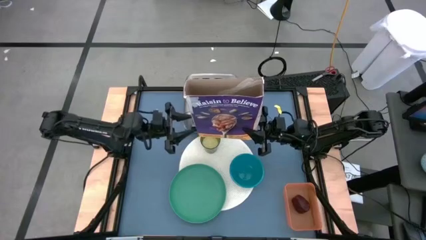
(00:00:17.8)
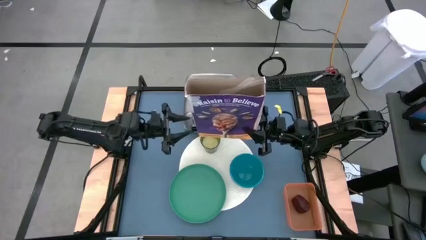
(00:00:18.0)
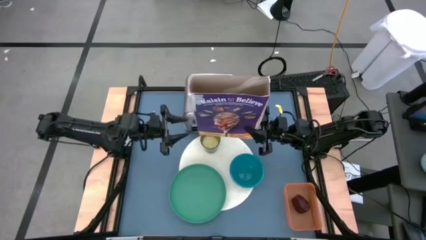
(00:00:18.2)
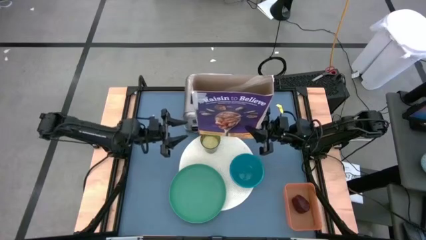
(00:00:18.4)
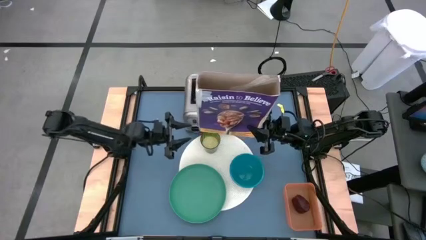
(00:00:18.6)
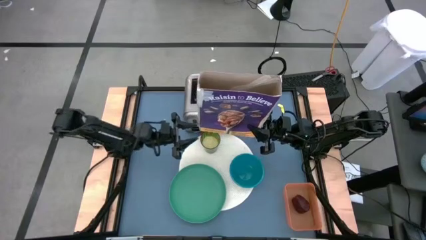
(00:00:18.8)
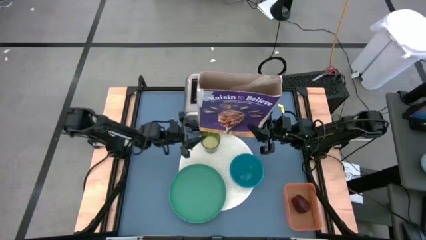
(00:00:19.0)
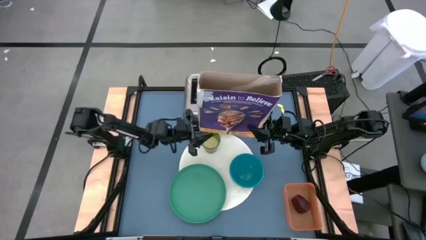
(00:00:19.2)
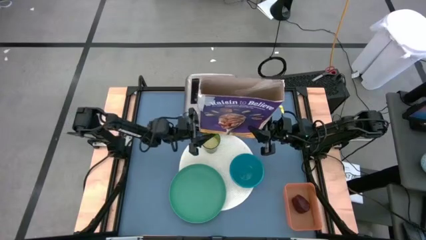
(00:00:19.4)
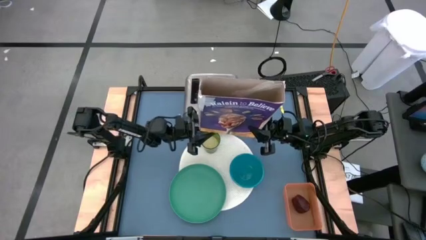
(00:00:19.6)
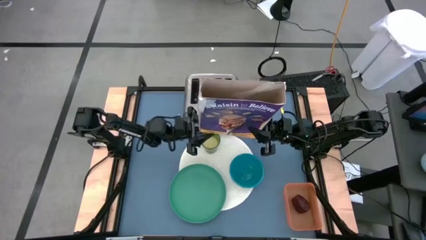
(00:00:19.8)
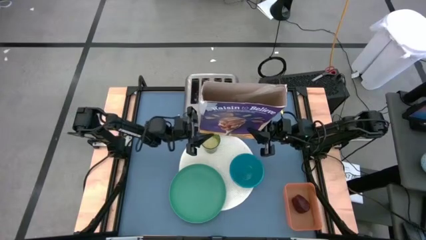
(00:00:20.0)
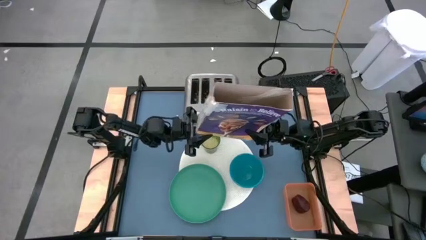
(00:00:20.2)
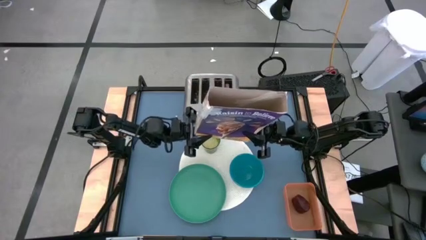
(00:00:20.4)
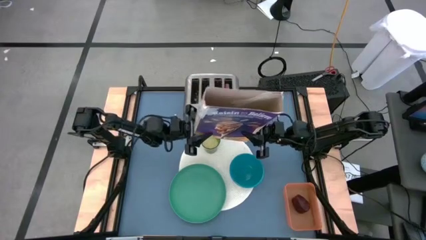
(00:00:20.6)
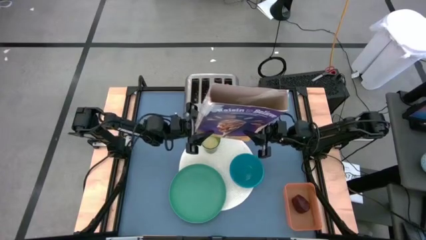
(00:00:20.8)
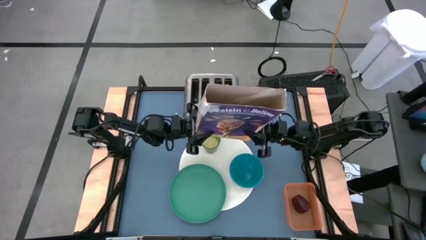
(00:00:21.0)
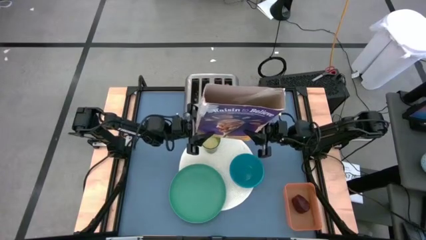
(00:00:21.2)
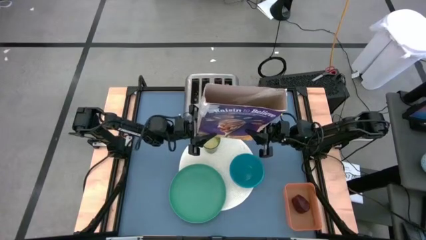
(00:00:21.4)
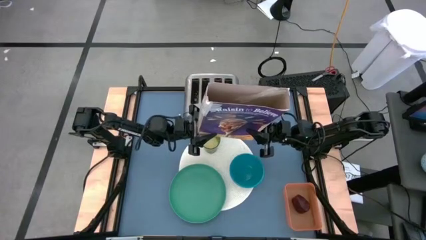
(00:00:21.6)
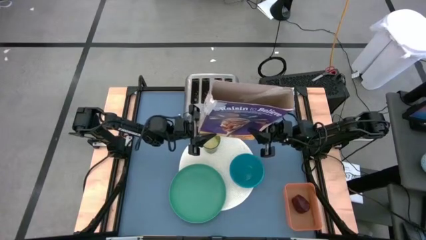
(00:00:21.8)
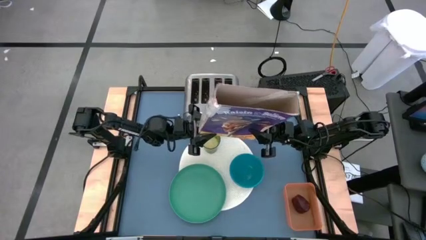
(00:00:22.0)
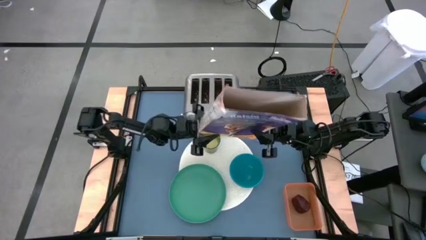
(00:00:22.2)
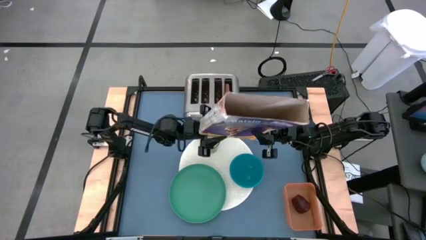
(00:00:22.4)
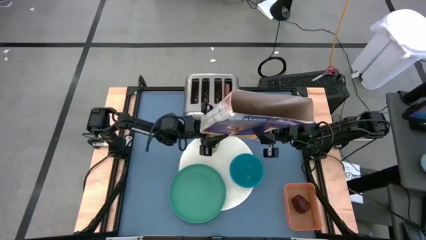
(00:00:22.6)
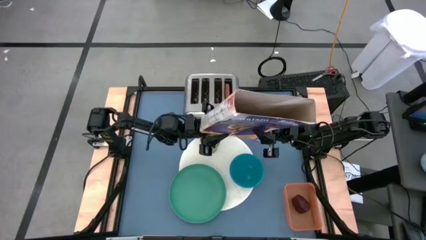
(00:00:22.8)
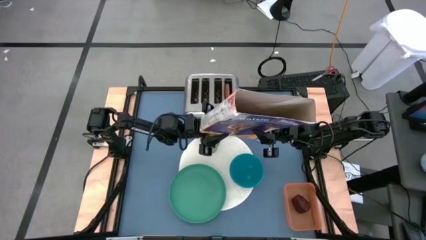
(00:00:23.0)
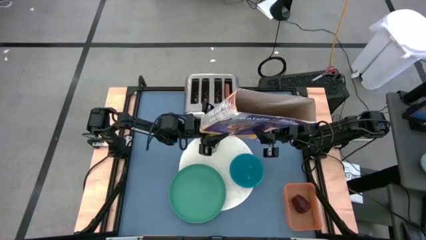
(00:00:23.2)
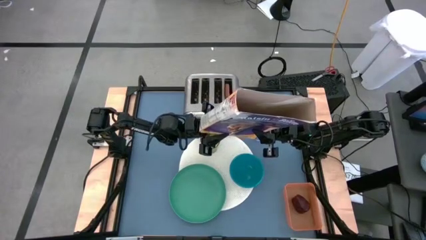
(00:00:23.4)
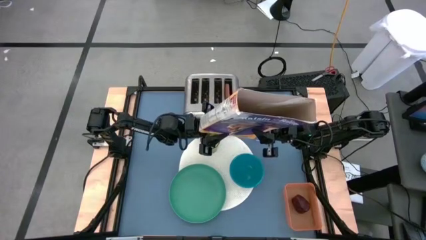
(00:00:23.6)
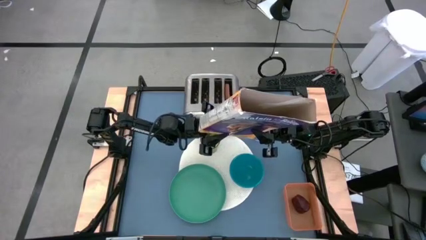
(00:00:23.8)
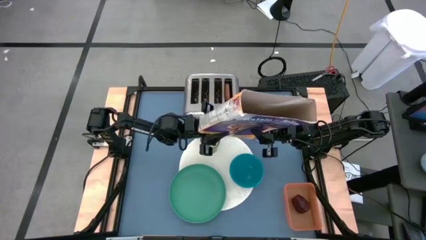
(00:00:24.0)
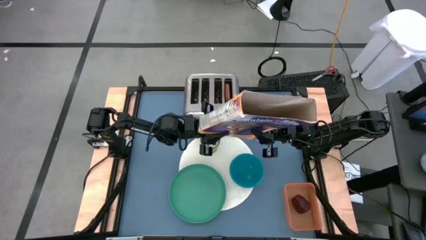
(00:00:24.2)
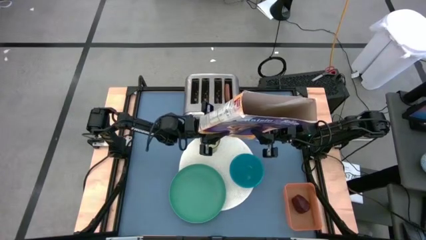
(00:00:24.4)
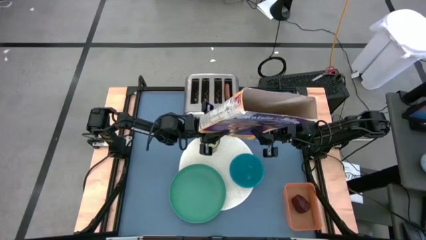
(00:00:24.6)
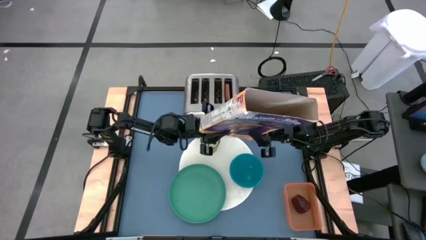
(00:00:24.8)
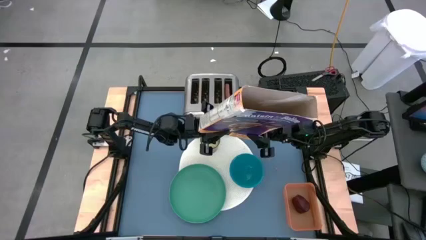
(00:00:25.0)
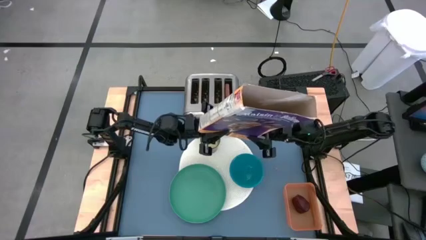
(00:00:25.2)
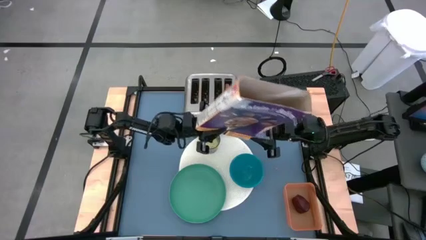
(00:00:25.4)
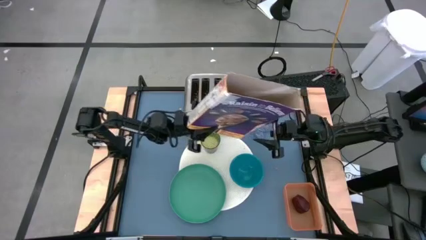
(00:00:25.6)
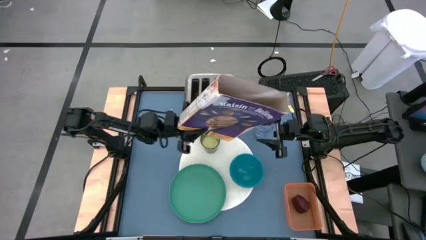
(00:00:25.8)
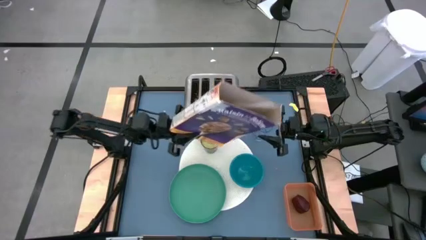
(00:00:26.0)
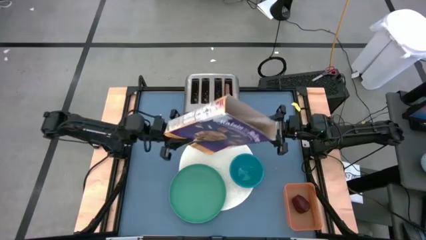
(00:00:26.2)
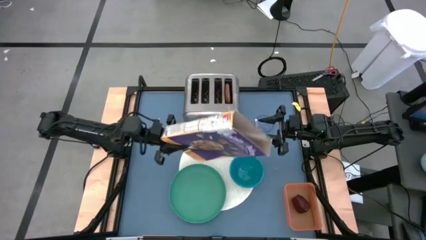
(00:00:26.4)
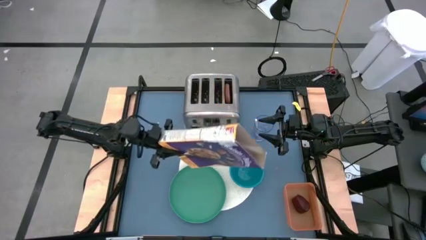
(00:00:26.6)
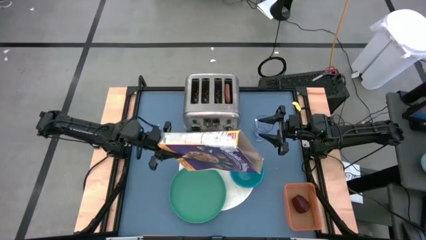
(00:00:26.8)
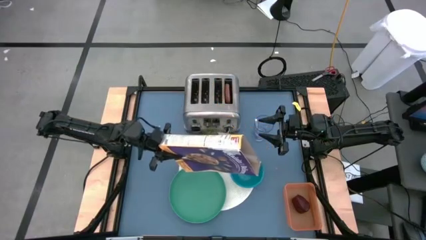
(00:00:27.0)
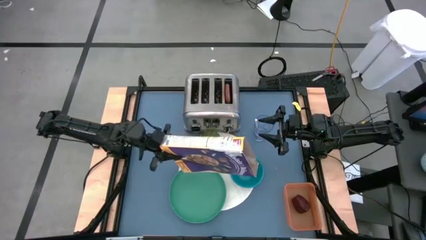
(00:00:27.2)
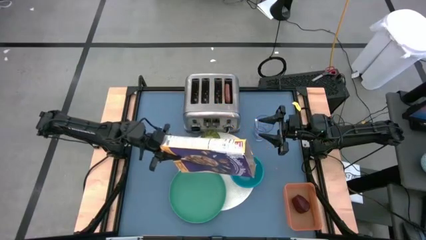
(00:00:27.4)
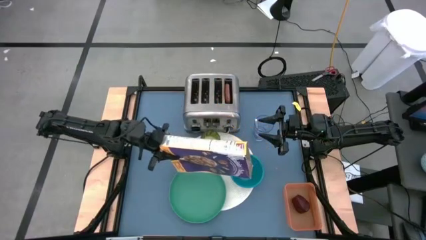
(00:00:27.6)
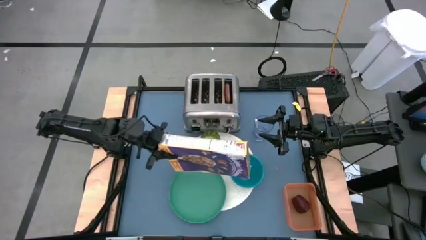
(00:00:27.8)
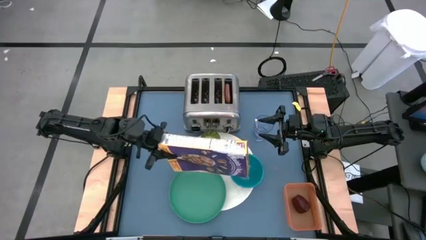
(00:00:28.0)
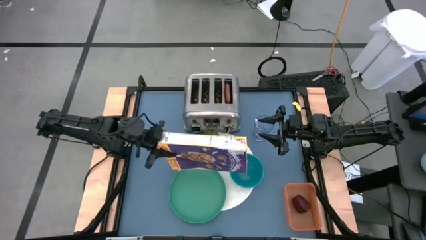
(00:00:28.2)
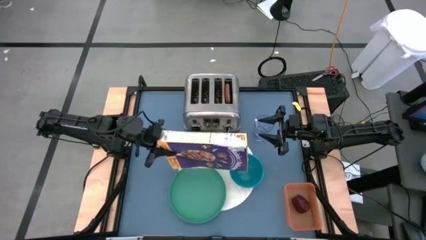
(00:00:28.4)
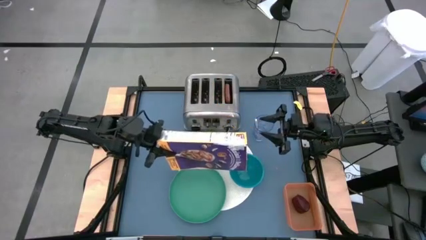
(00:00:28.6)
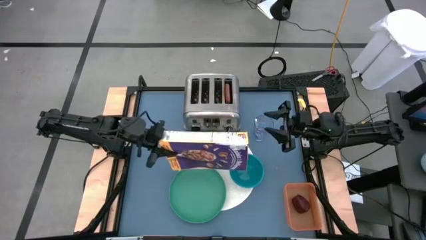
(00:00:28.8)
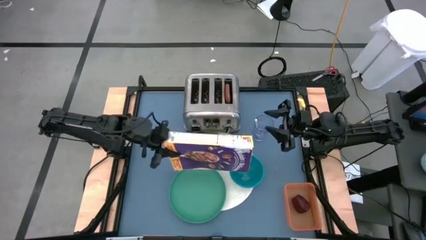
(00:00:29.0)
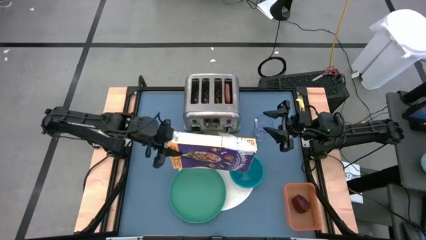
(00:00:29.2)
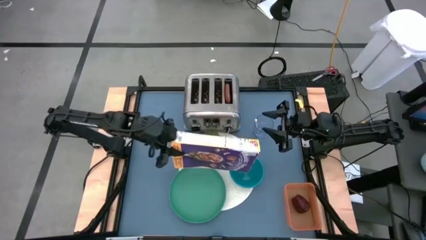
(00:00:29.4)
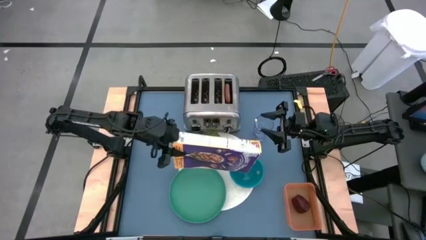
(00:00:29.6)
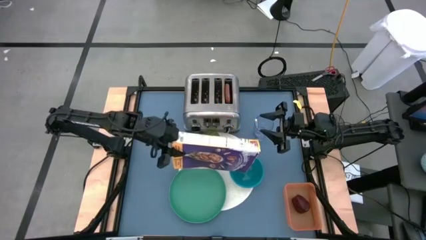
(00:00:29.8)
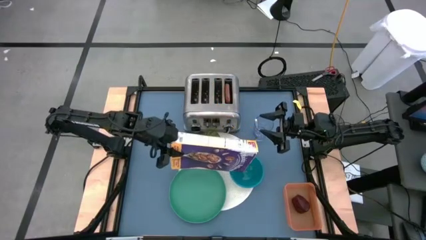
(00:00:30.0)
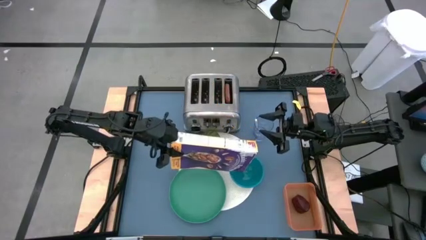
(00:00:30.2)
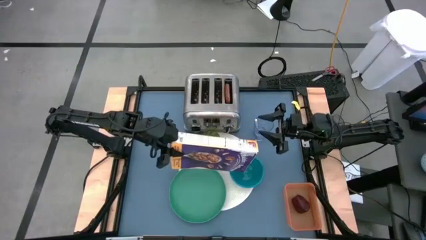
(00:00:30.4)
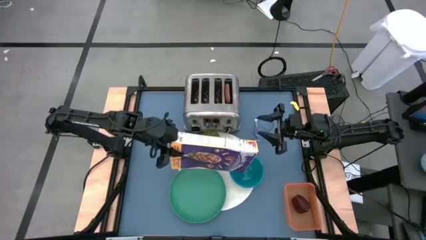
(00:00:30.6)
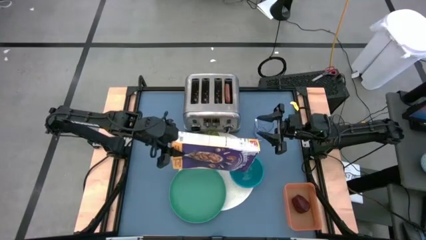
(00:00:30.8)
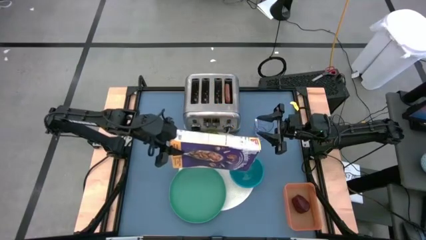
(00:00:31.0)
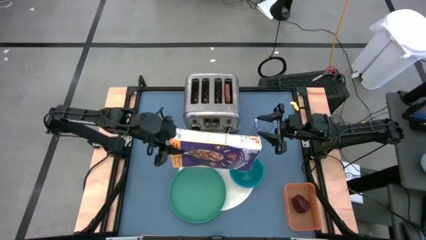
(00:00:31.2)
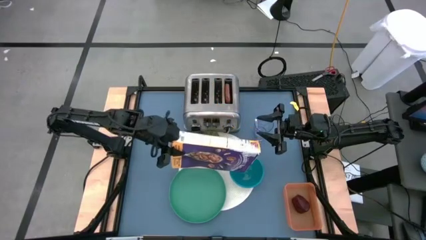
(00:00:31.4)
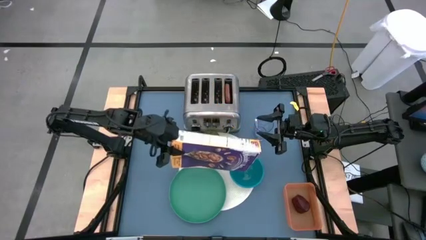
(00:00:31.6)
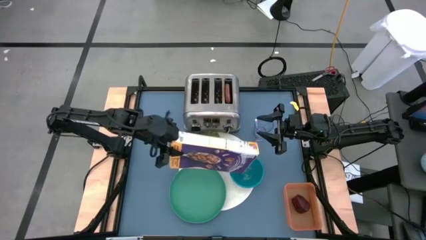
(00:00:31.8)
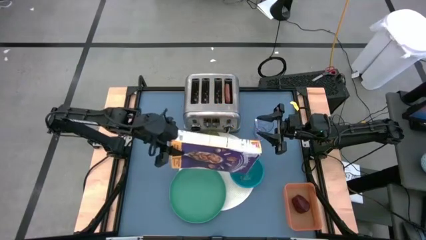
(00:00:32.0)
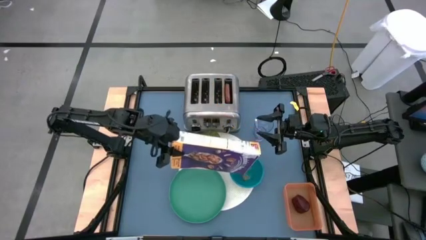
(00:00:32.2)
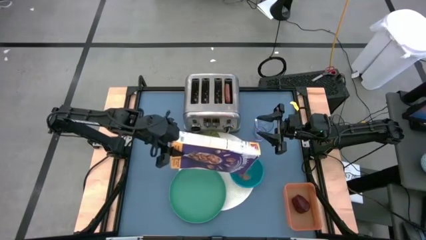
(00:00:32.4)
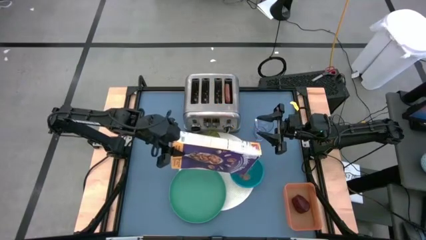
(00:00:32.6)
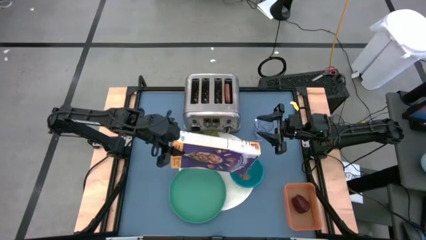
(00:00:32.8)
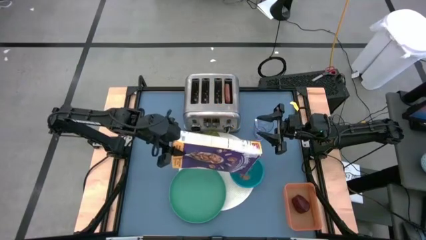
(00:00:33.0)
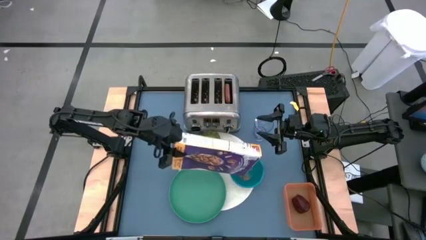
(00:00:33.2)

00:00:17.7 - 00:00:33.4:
Task: Arrange a breakfast setting
Pour the cereal into the blue bowl
